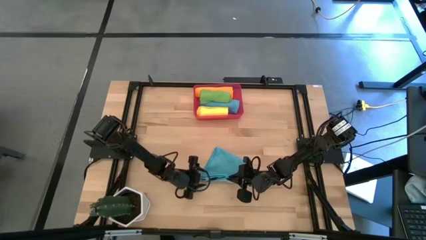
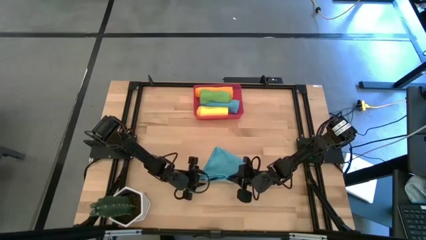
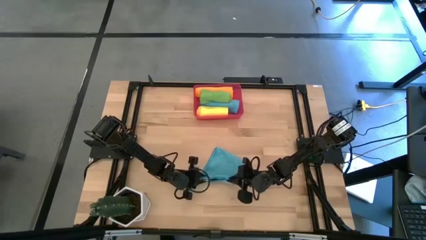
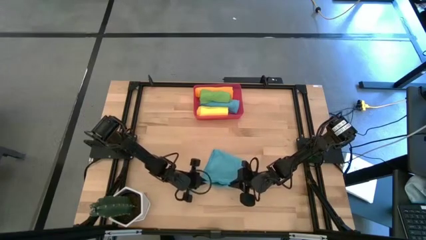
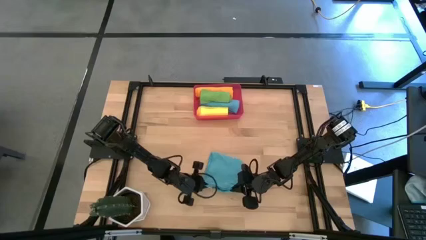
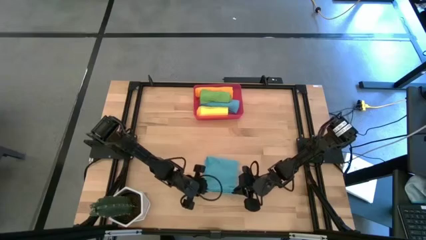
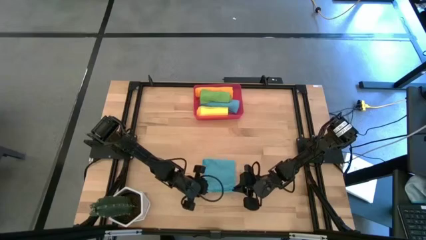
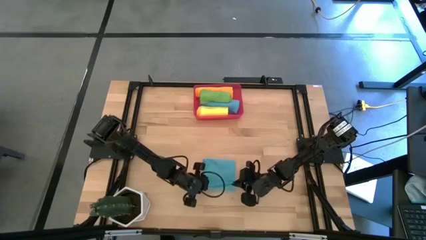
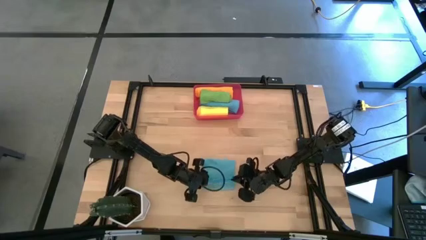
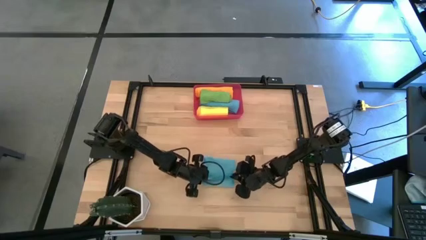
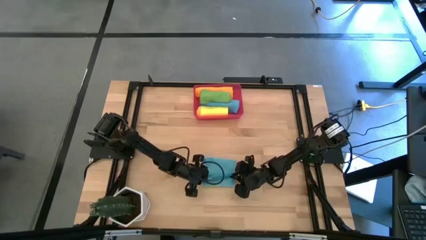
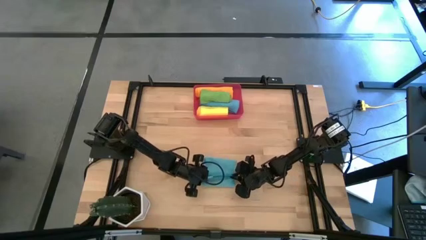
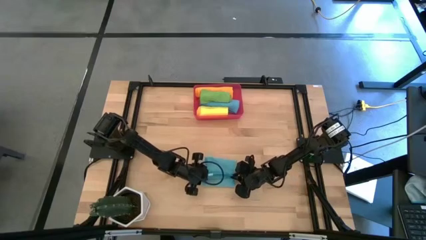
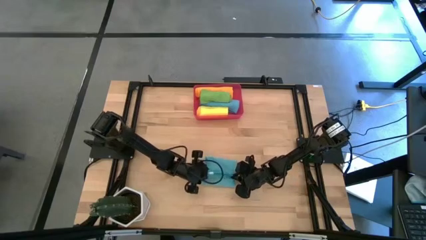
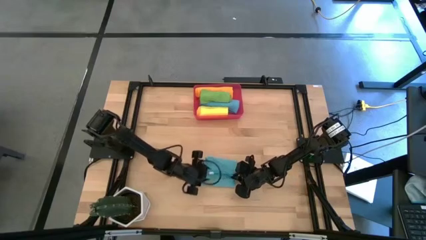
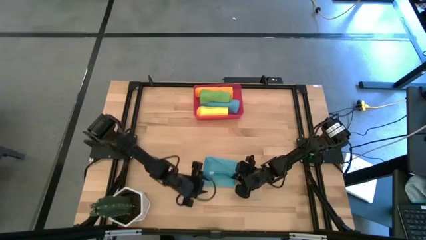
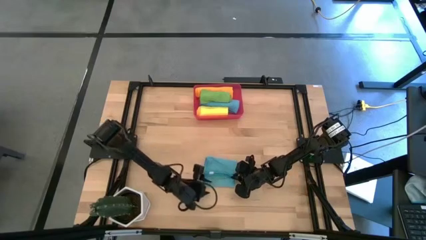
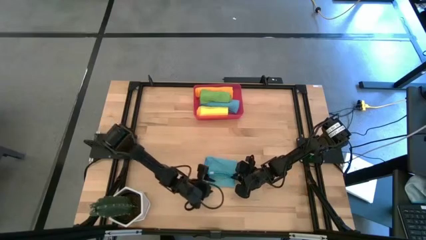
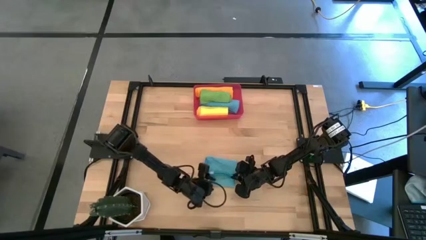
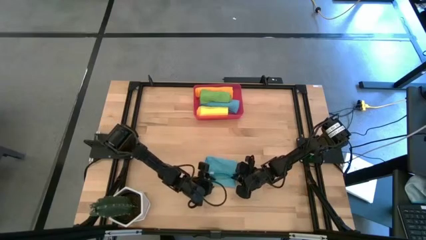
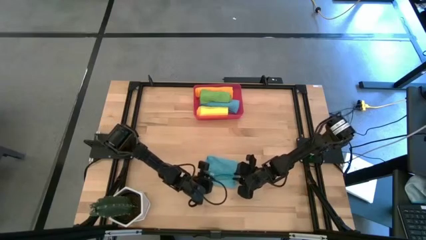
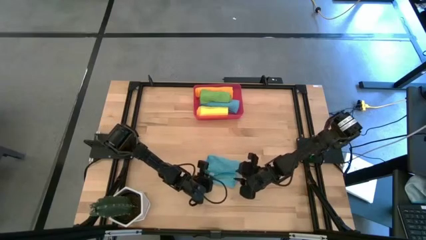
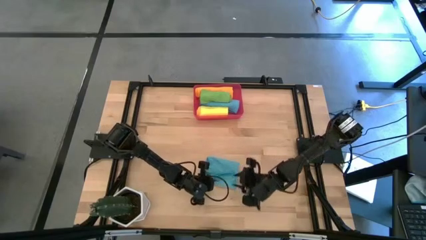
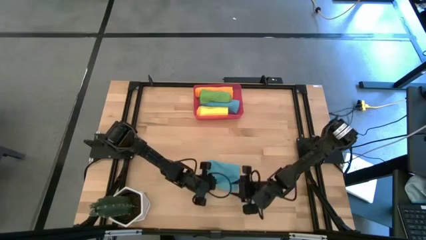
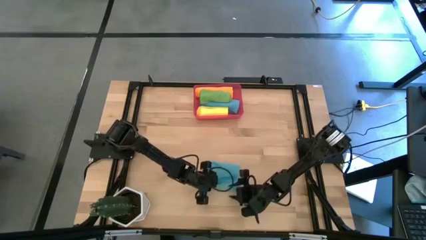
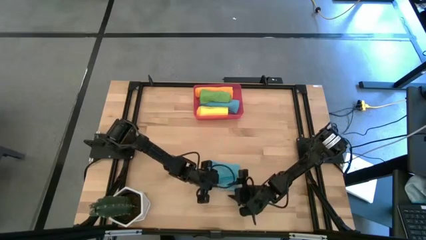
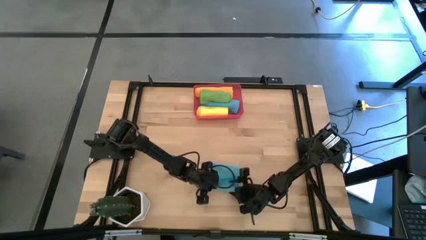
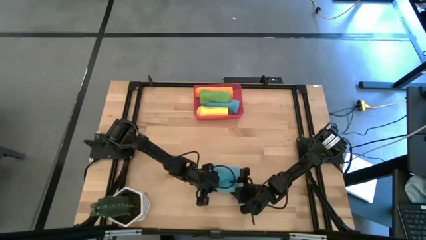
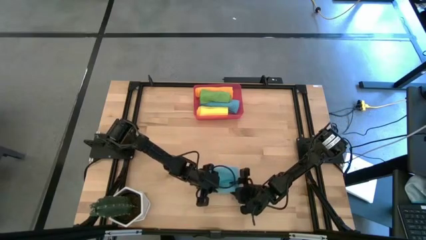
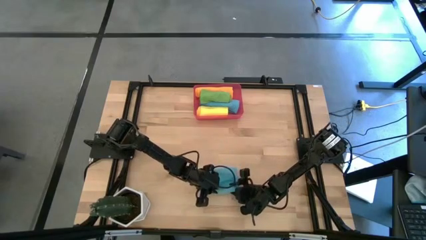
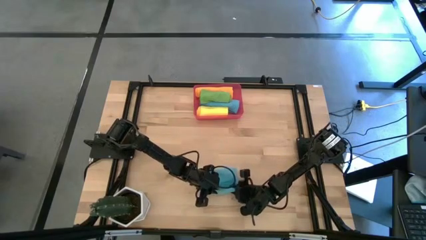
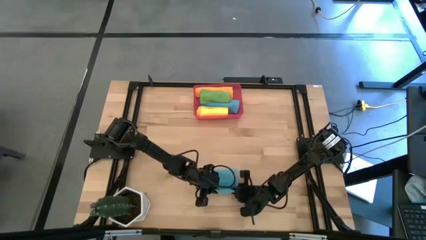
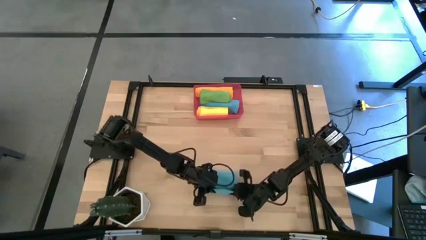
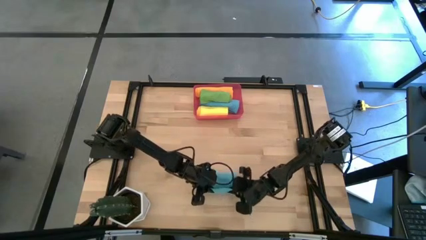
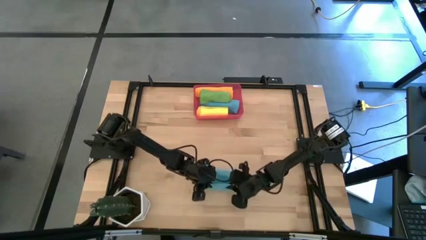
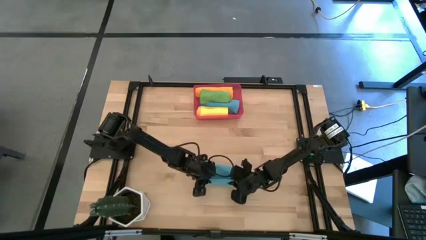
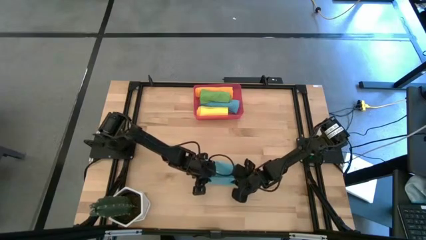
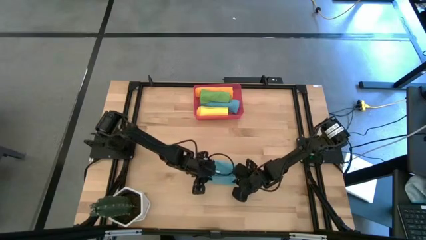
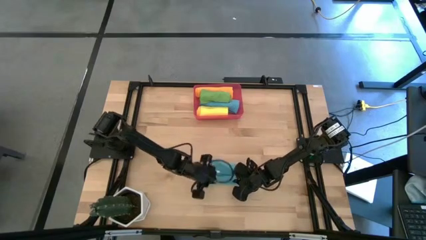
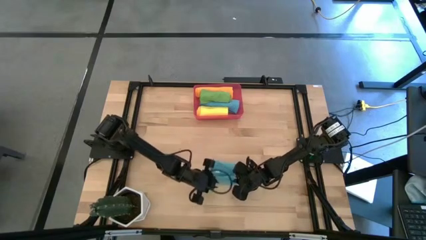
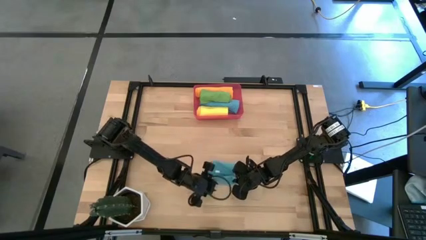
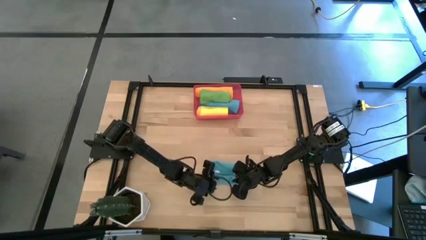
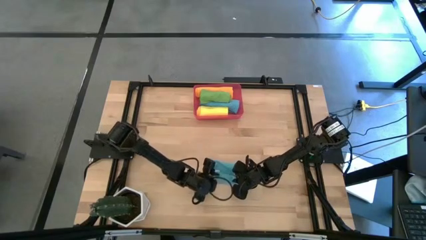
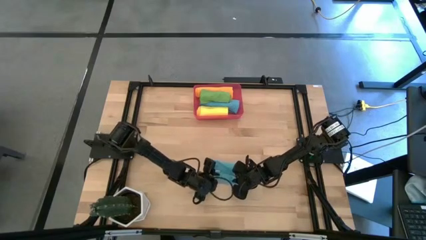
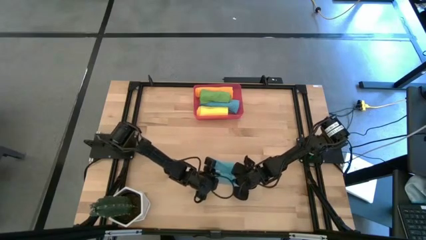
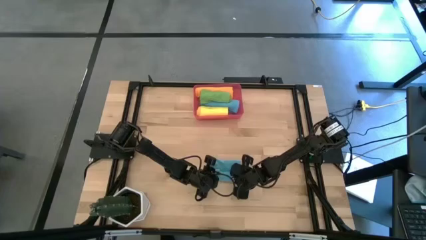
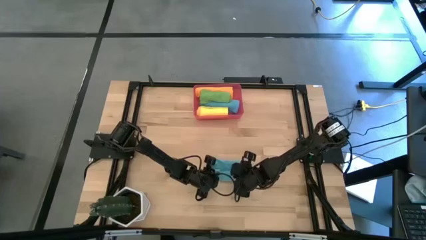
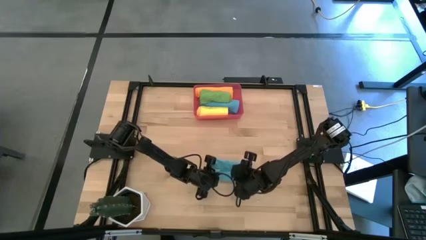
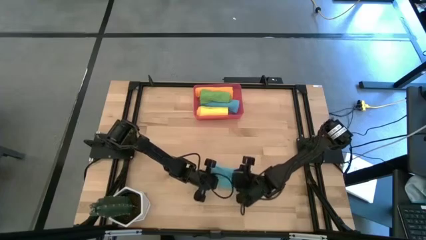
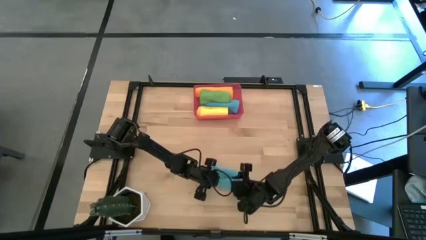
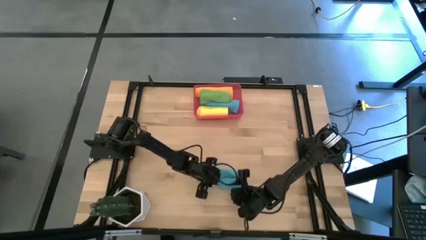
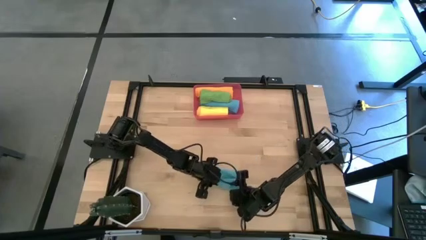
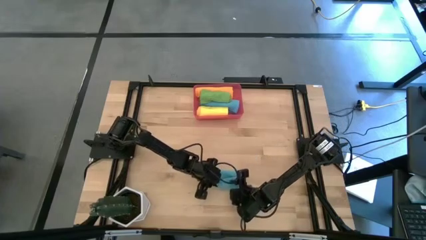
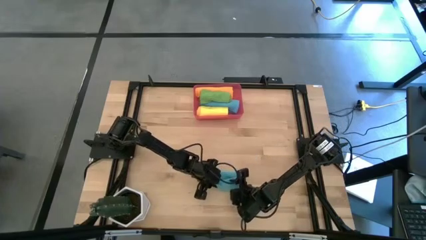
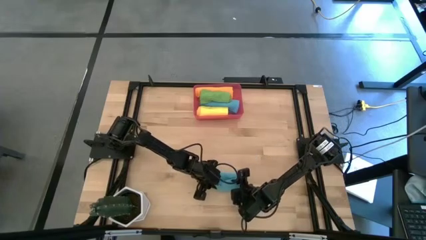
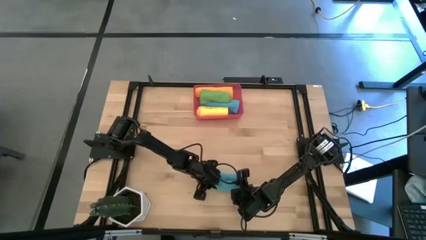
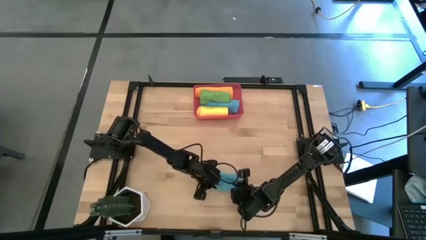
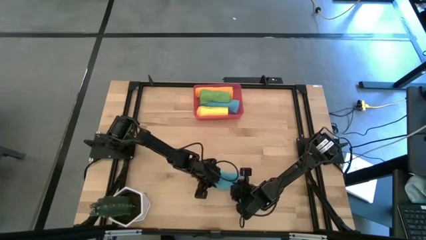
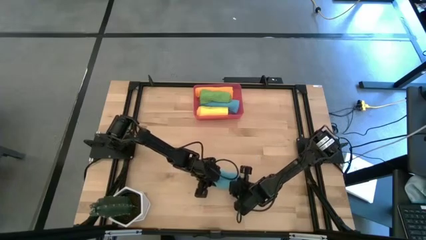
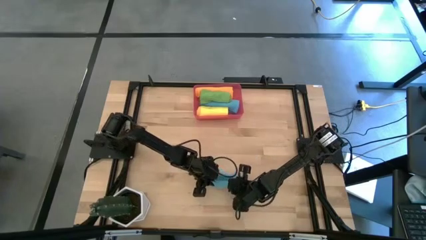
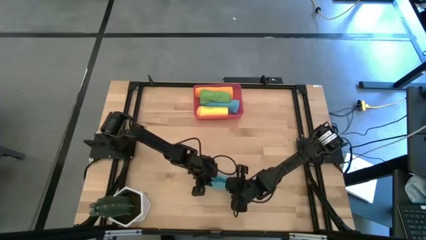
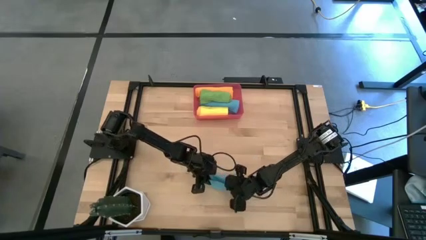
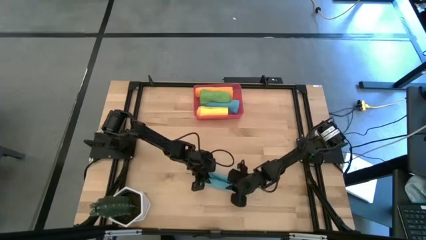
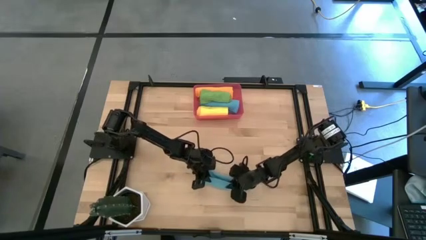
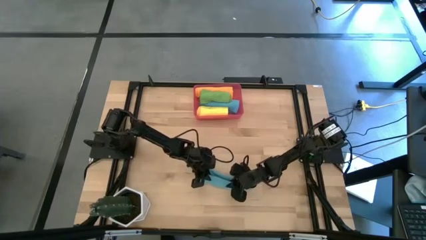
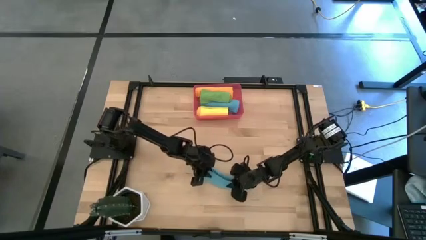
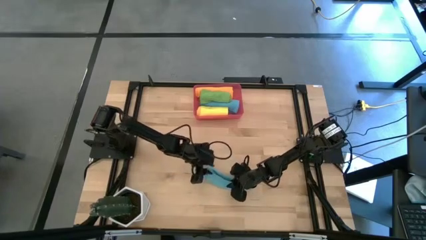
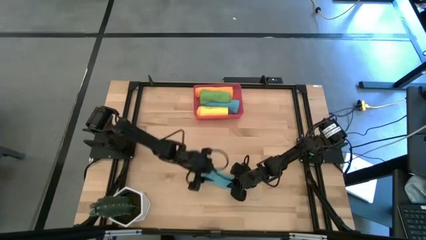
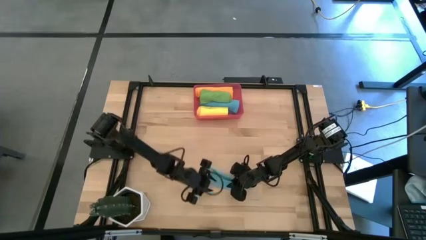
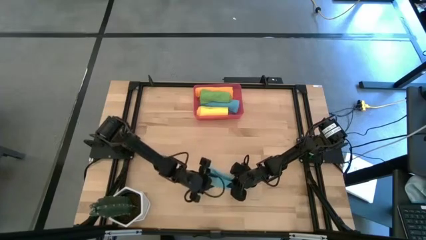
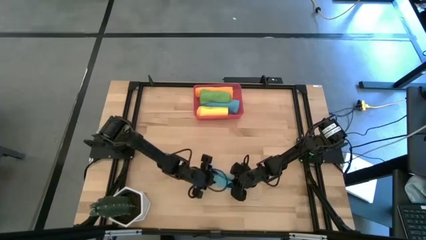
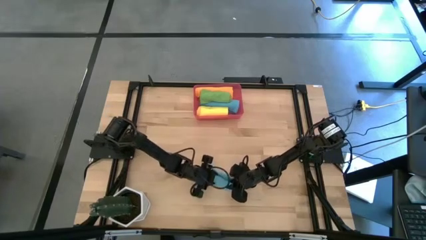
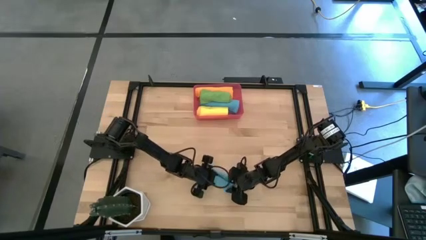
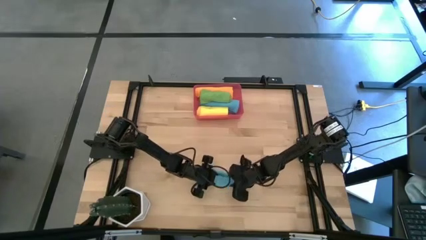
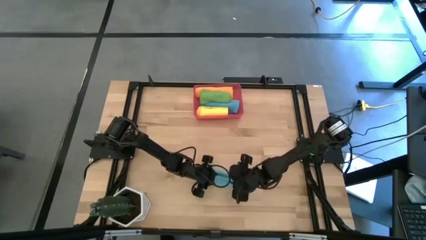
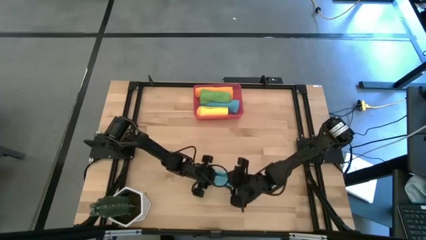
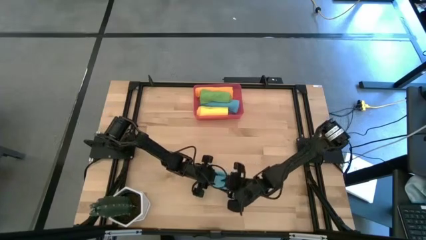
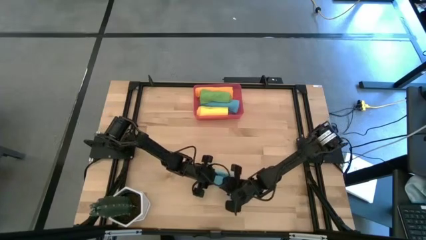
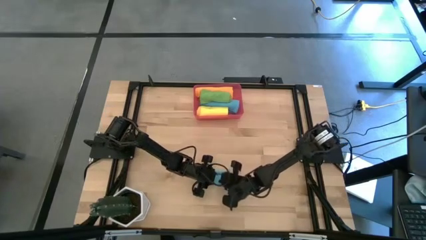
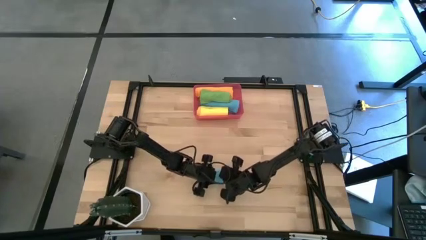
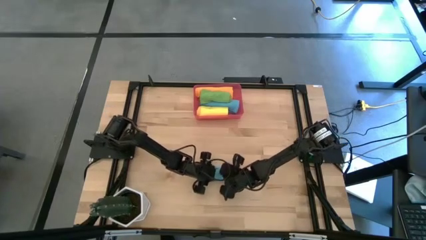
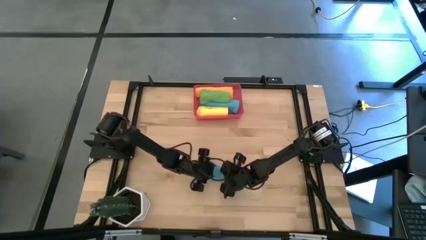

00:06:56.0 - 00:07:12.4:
Task: Roll microfiber towels into tight, uniform cylinder then place into a basket
Roll the blue microfiber cloth
